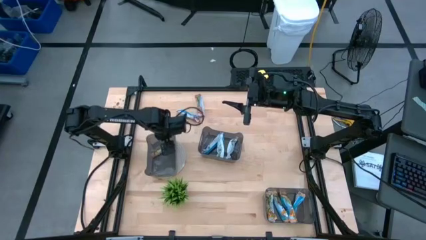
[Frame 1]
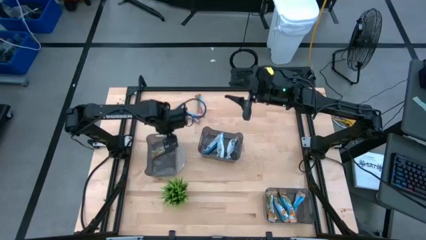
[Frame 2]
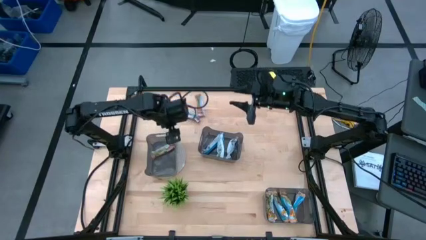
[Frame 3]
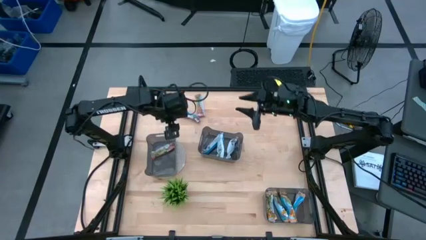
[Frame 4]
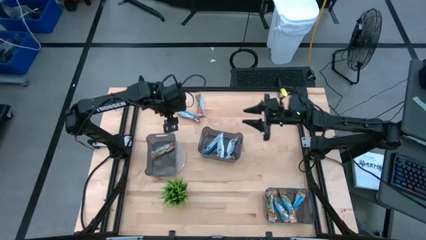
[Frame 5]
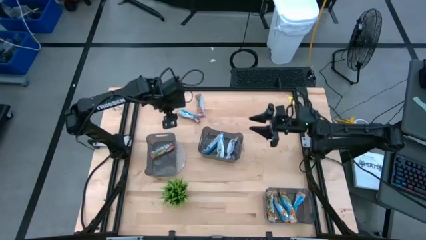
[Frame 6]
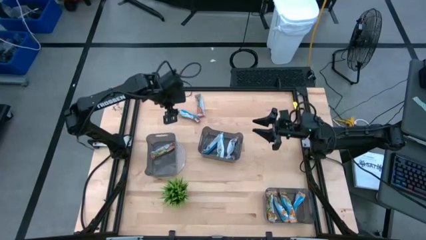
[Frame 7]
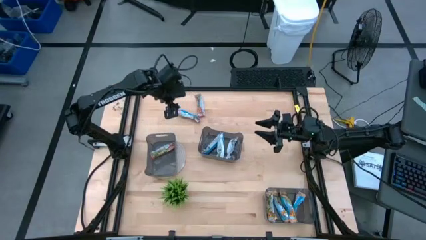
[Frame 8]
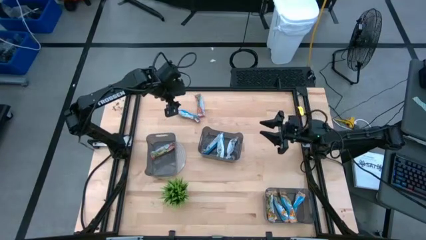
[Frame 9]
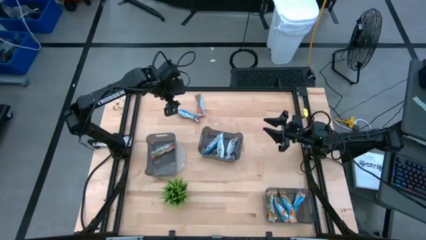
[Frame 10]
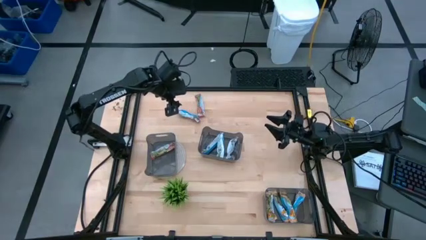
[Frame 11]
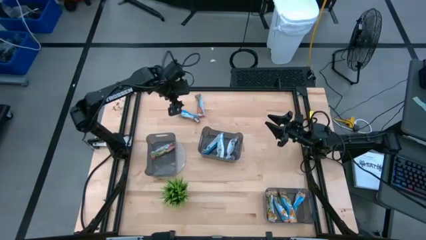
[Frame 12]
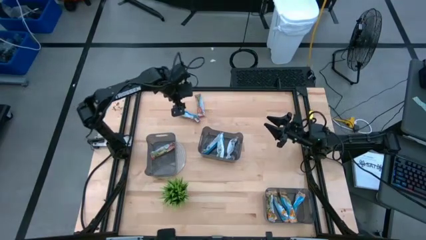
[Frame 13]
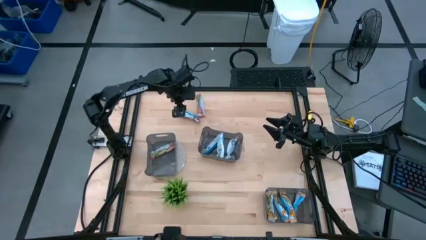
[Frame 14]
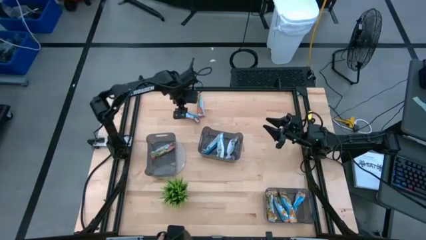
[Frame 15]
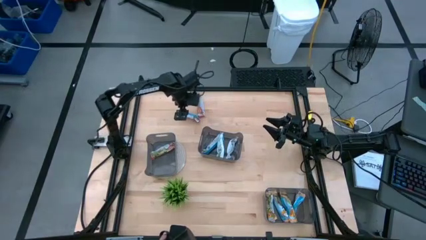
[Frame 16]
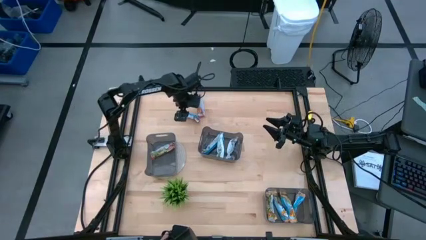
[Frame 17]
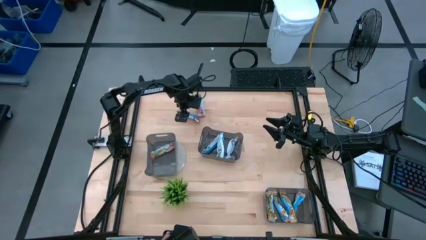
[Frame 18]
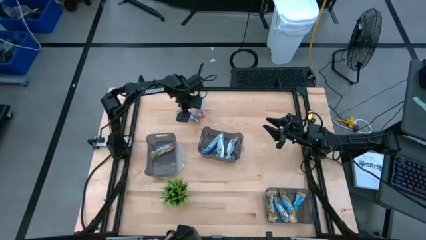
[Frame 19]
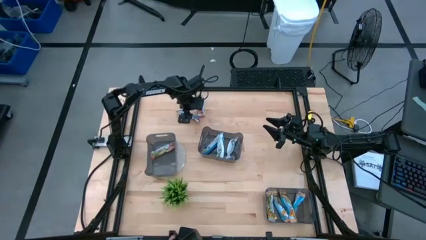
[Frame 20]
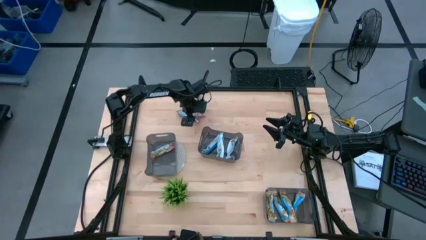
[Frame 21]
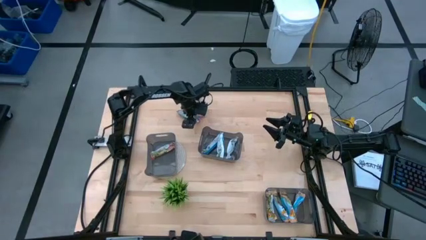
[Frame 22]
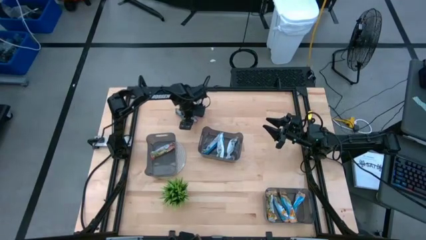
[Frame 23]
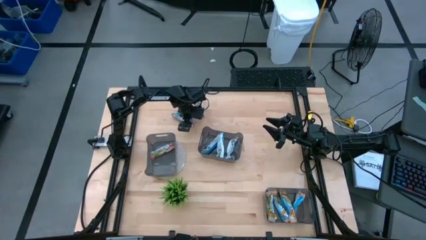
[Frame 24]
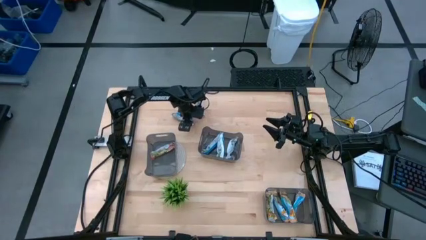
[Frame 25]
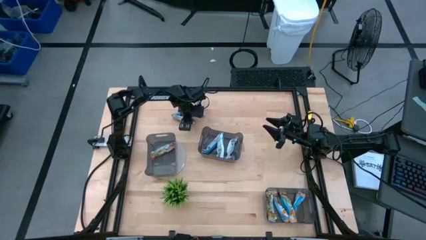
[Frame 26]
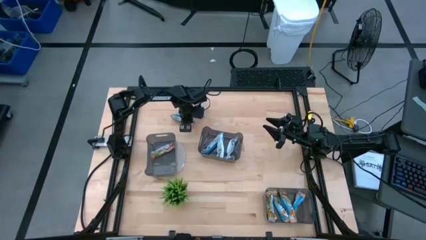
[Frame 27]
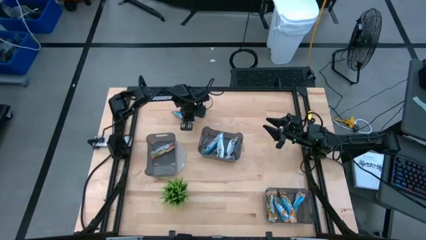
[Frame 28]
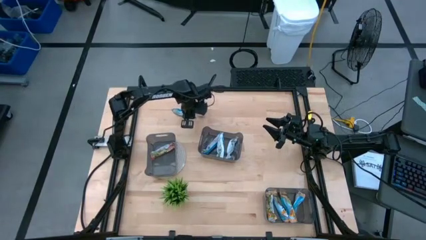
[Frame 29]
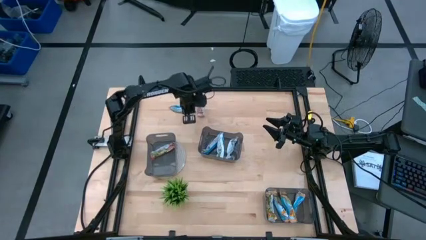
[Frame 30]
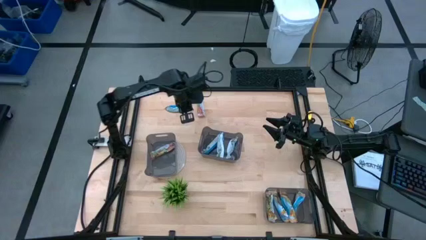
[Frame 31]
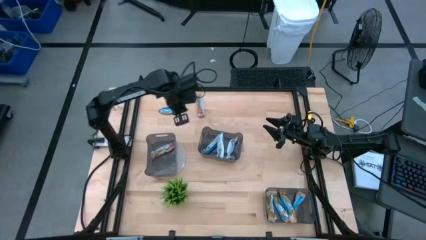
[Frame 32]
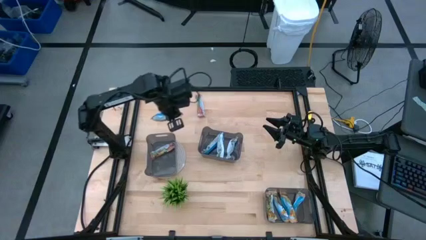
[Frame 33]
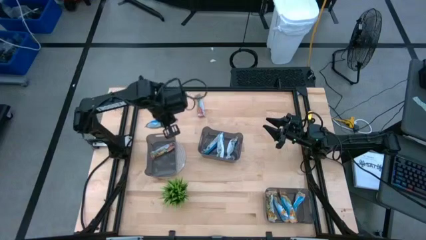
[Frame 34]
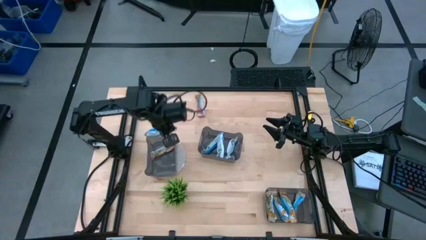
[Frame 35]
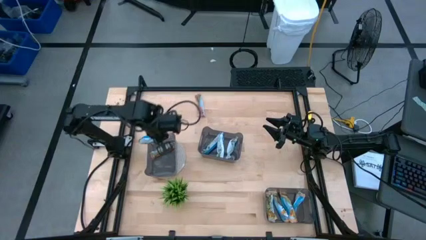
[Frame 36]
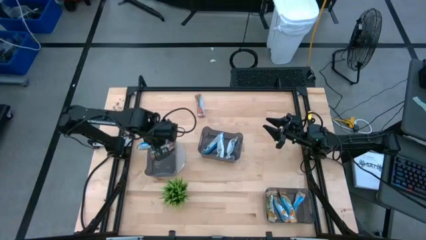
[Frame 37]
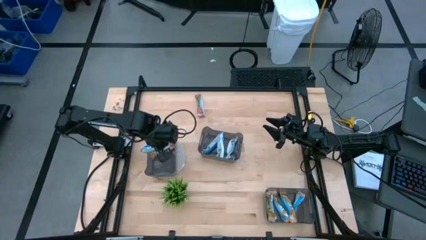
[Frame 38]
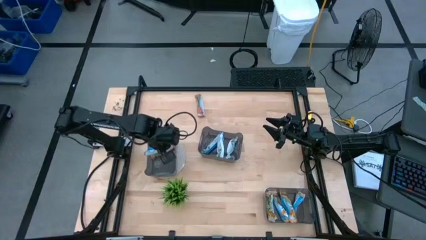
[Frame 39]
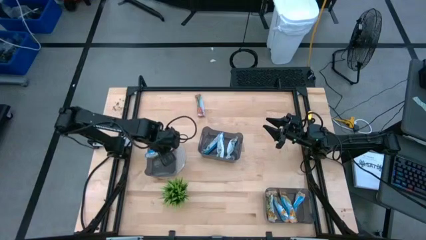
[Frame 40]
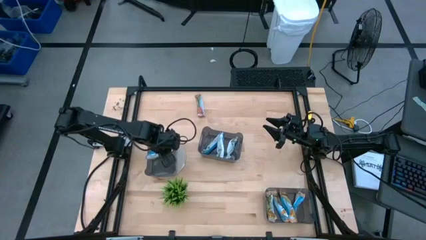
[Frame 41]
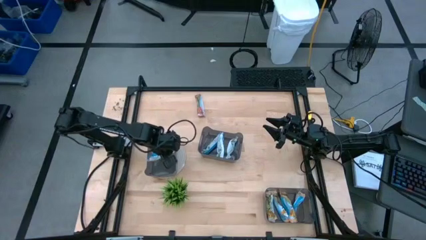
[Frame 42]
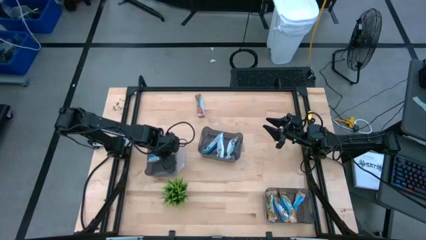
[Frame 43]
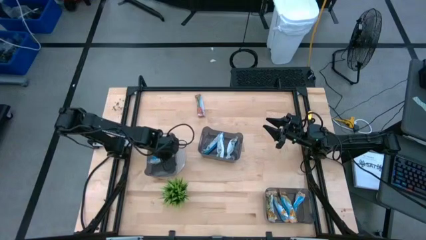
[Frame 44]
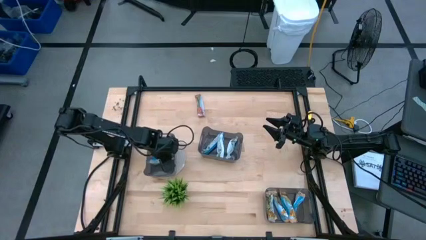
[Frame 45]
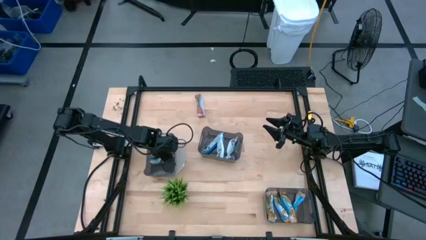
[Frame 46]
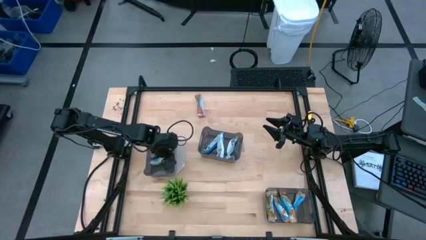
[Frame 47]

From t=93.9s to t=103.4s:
Task: Pick and place Granola Bars by type
Put the red granola bar into the middle left black bin

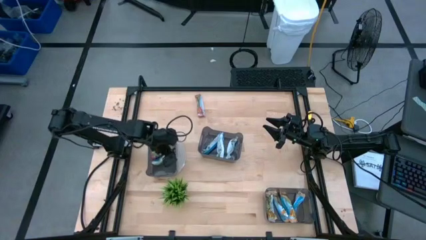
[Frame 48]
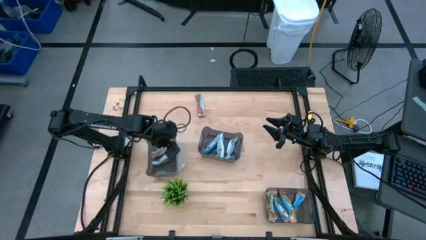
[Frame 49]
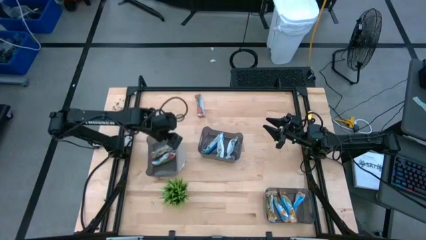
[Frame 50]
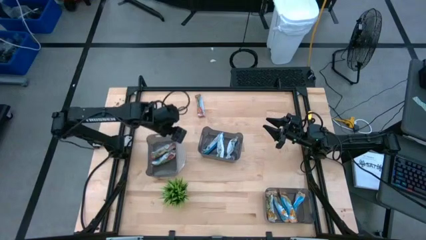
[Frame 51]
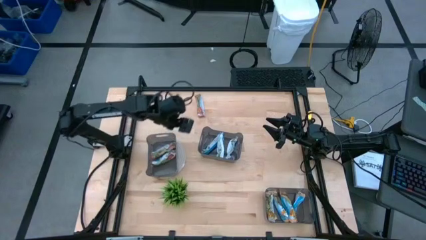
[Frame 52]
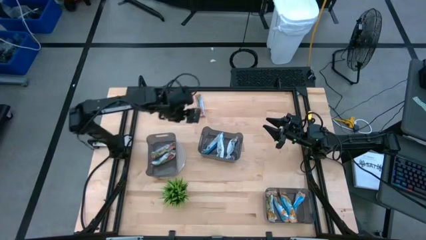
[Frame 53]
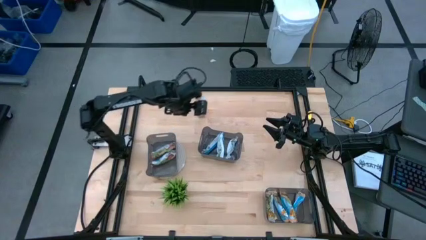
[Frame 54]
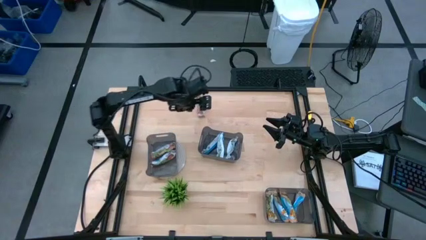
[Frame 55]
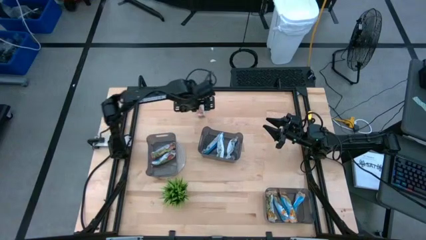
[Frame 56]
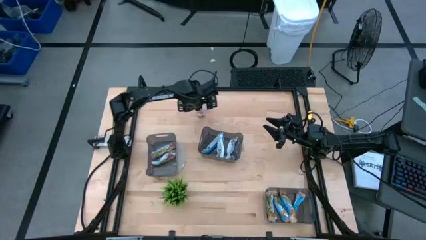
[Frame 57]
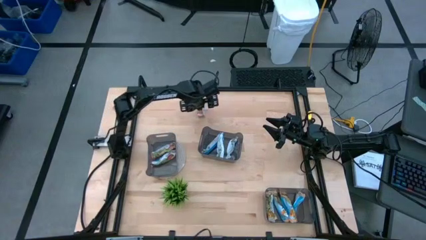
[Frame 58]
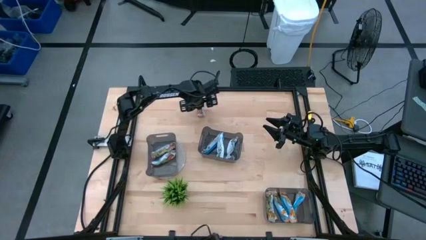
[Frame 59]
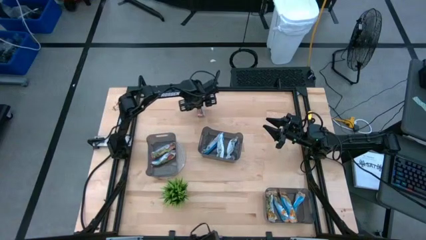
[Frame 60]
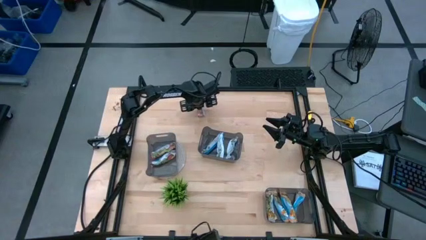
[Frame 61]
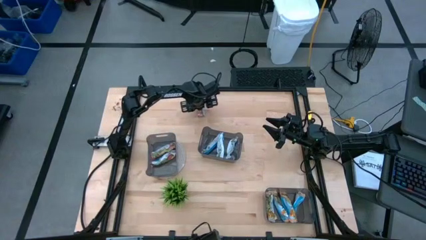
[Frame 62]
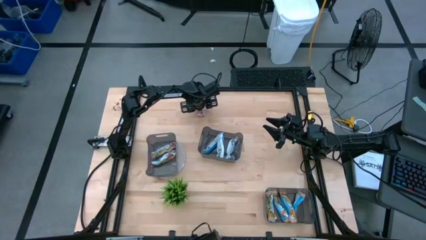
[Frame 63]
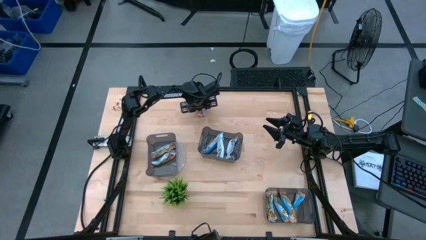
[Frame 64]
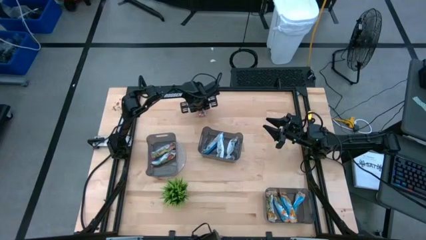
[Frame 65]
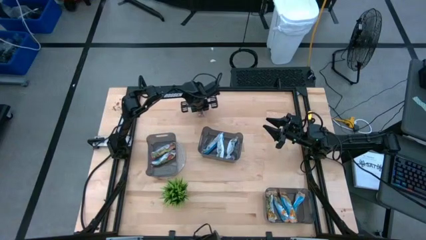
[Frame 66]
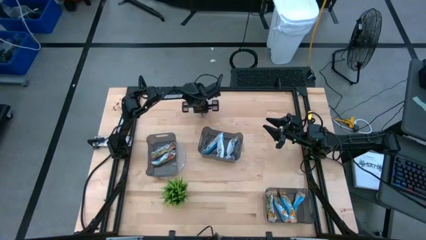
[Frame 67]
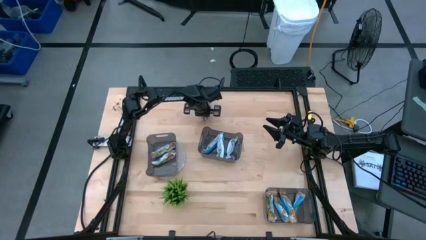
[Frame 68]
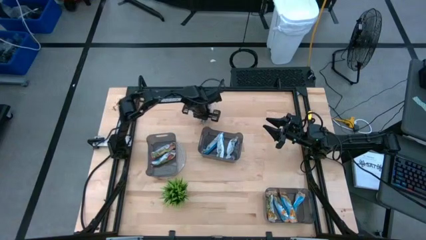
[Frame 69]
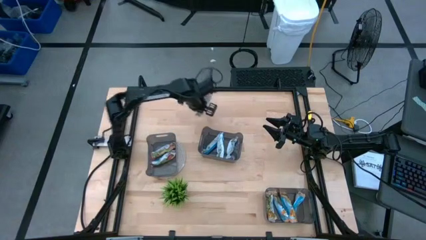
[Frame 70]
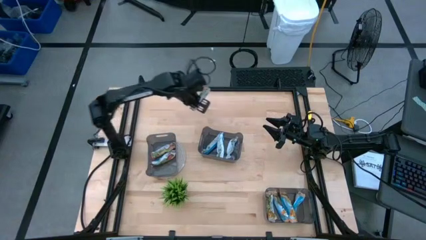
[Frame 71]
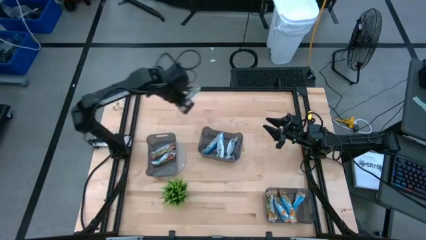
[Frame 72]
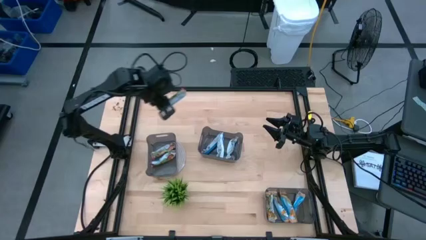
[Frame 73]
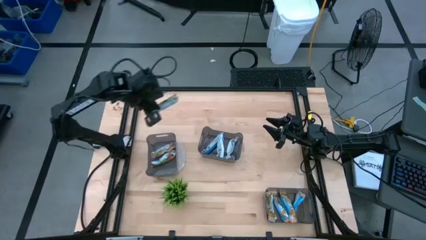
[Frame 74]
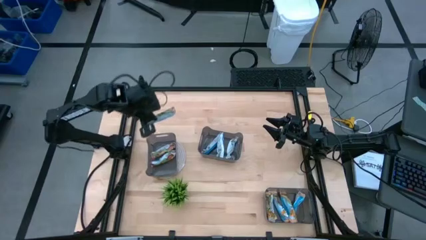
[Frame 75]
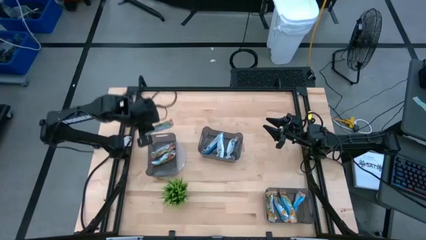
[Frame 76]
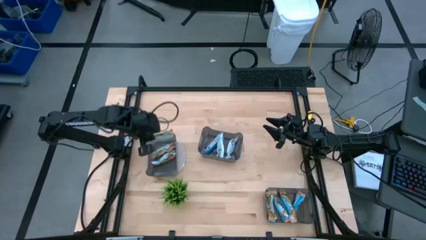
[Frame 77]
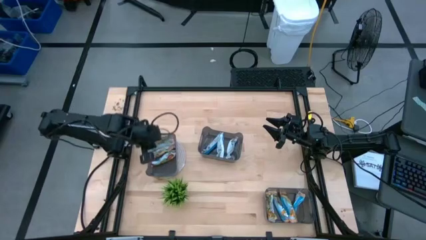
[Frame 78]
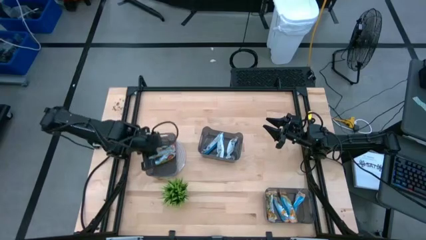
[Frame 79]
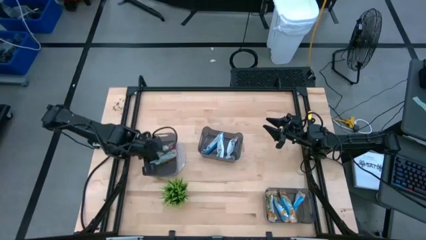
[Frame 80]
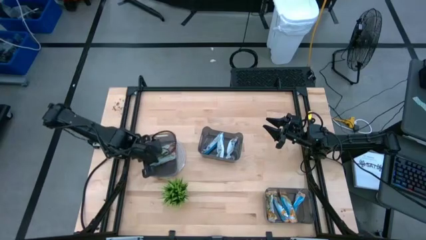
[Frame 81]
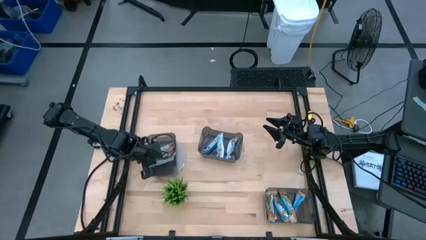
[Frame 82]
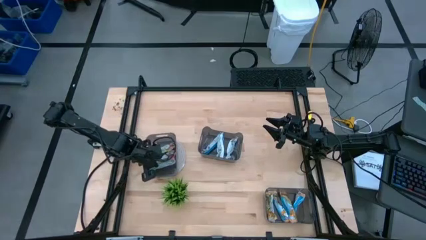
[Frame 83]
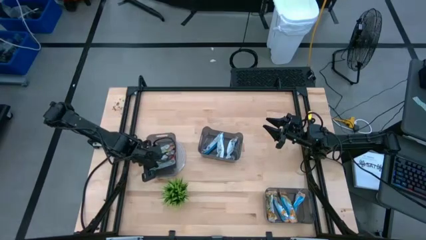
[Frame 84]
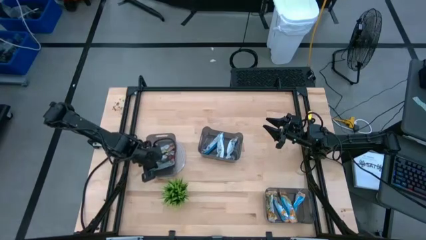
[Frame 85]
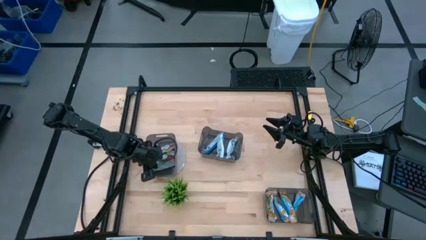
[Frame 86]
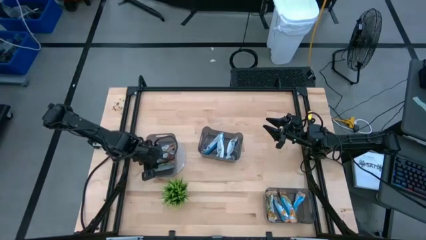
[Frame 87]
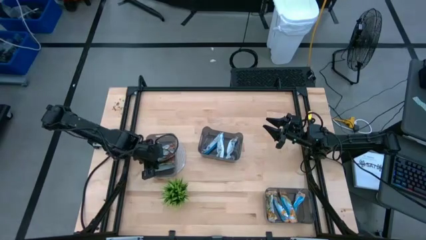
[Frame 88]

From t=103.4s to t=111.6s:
Put the red granola bar into the middle left black bin
